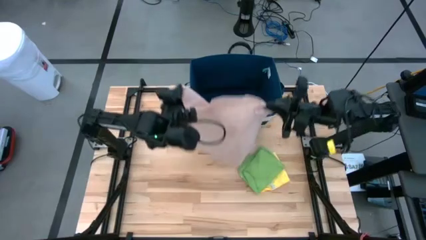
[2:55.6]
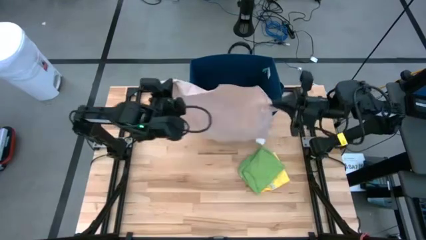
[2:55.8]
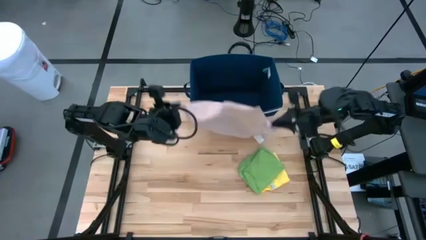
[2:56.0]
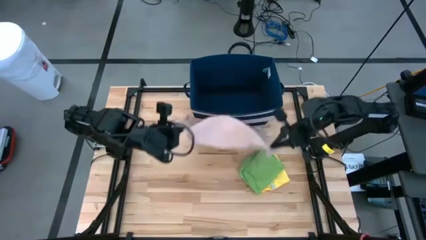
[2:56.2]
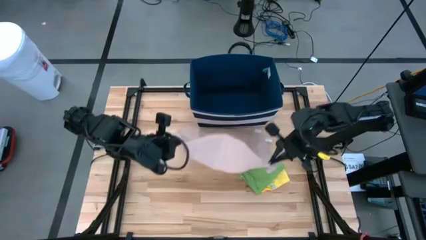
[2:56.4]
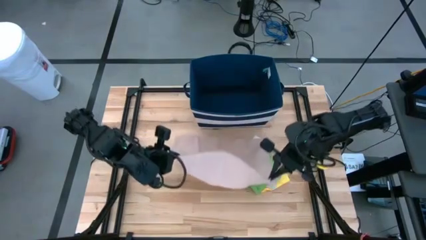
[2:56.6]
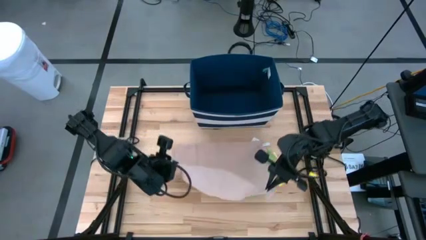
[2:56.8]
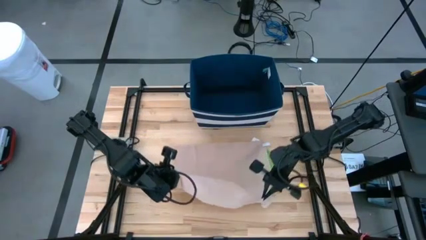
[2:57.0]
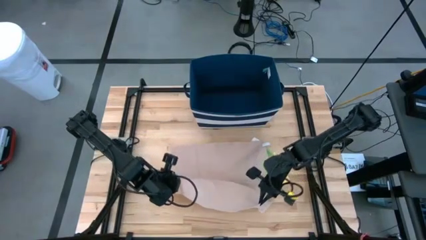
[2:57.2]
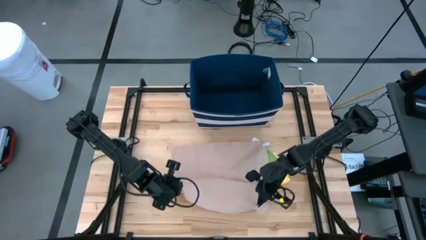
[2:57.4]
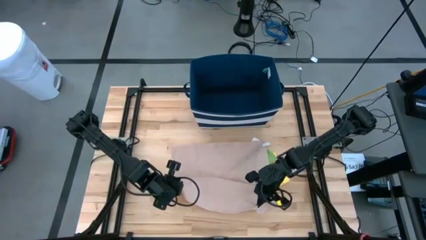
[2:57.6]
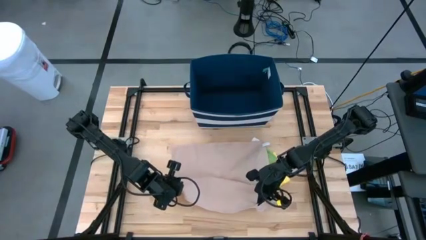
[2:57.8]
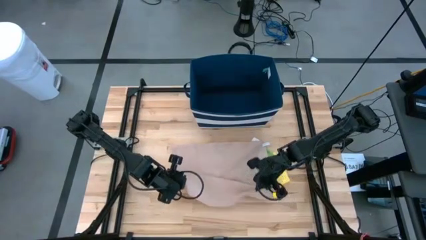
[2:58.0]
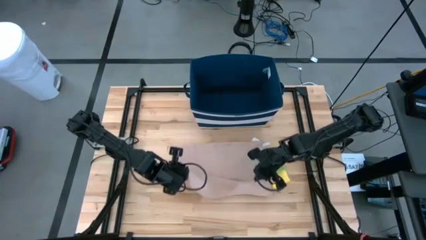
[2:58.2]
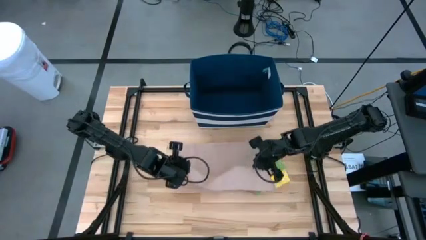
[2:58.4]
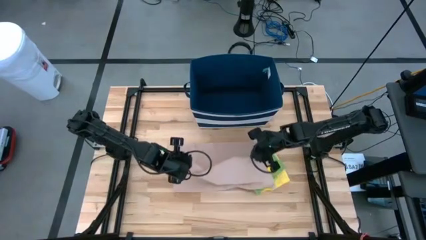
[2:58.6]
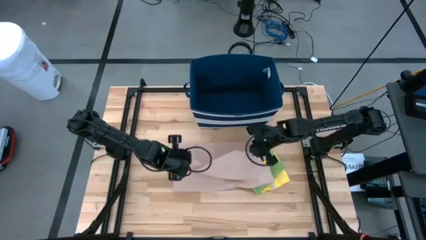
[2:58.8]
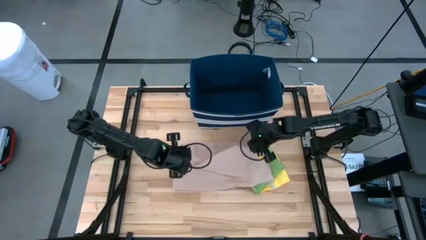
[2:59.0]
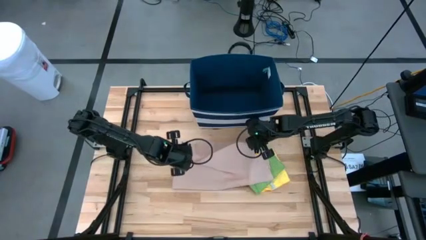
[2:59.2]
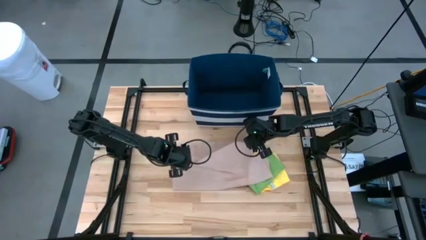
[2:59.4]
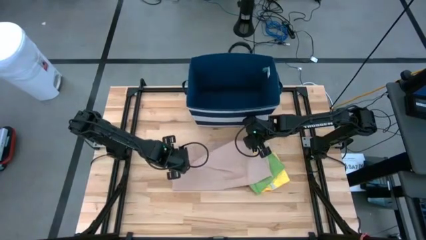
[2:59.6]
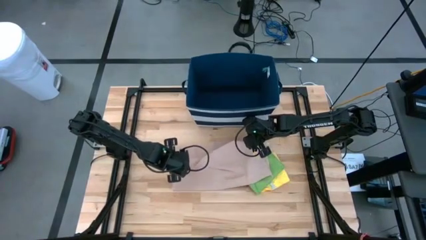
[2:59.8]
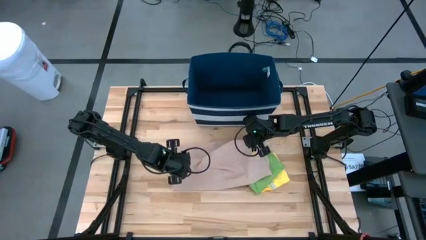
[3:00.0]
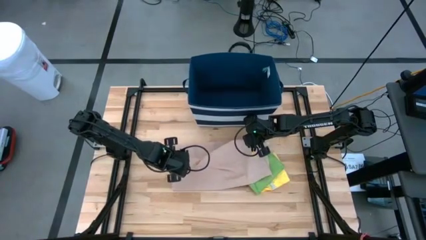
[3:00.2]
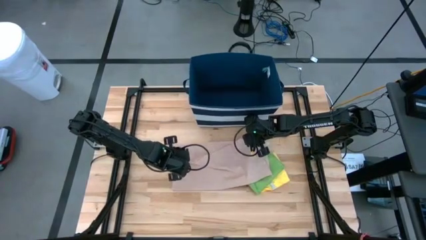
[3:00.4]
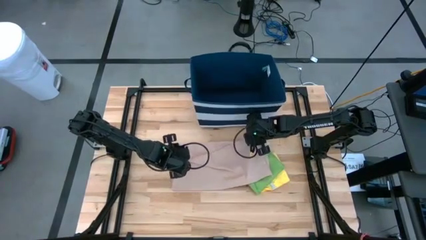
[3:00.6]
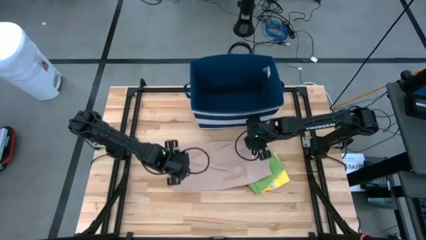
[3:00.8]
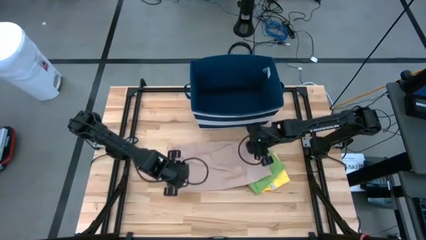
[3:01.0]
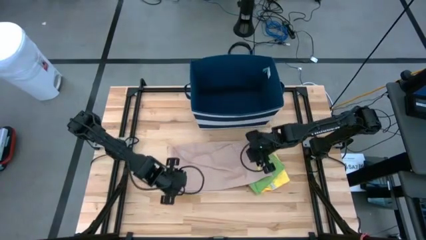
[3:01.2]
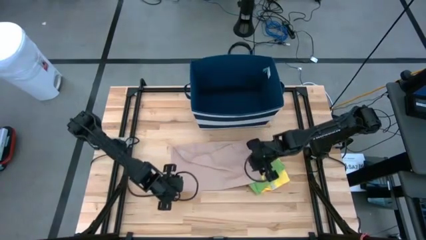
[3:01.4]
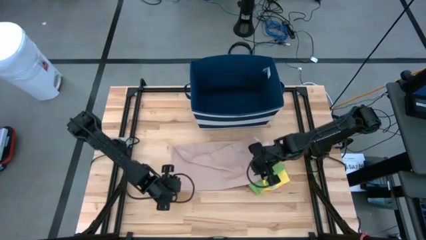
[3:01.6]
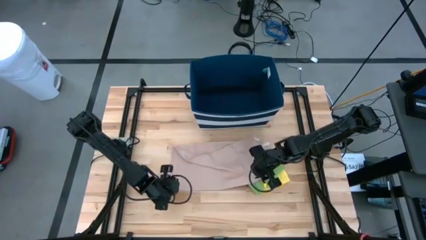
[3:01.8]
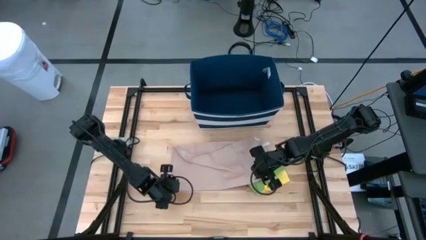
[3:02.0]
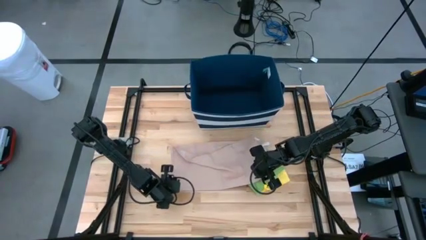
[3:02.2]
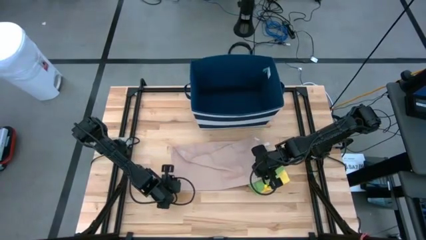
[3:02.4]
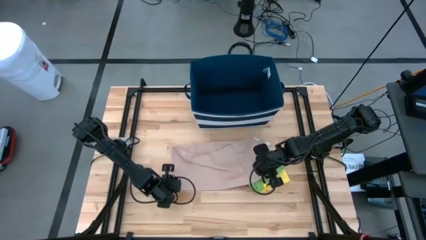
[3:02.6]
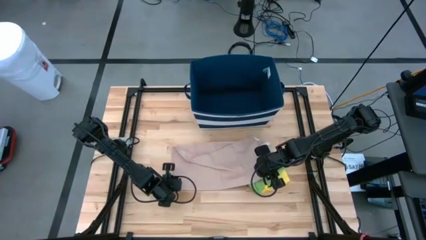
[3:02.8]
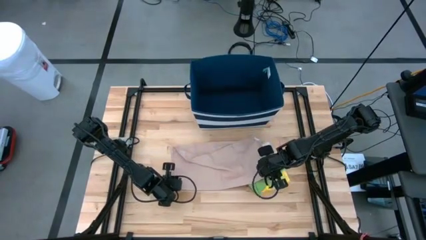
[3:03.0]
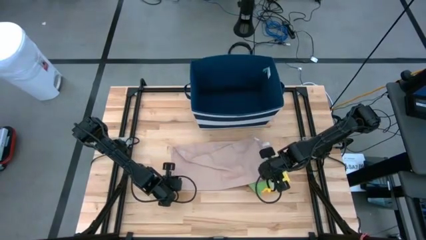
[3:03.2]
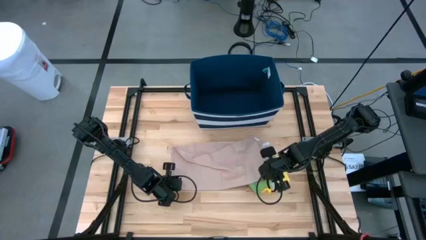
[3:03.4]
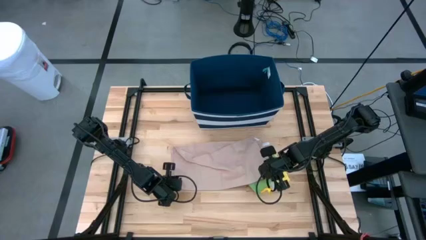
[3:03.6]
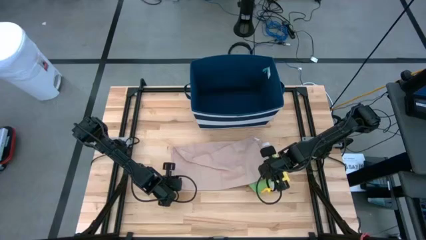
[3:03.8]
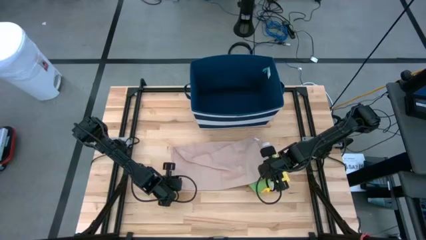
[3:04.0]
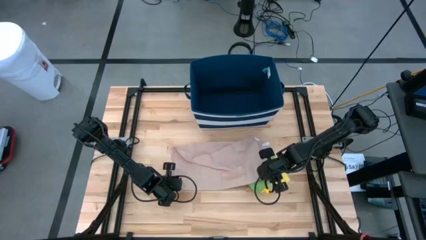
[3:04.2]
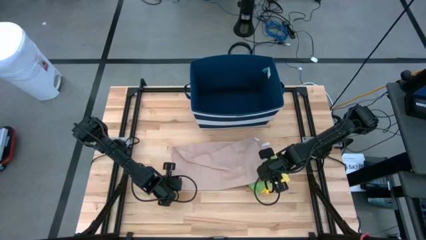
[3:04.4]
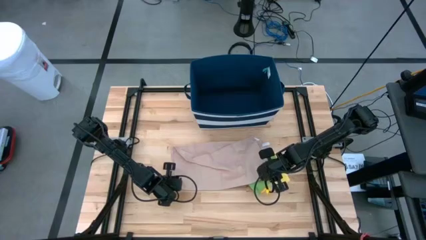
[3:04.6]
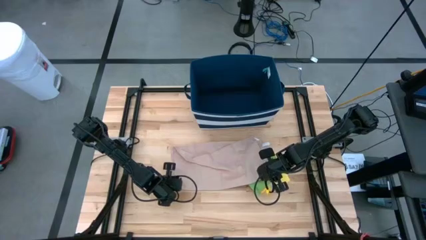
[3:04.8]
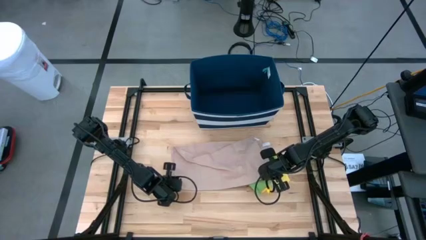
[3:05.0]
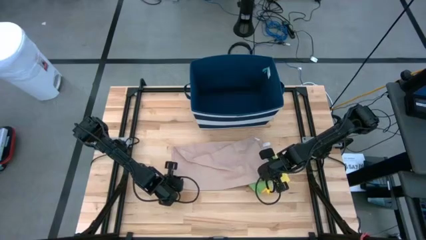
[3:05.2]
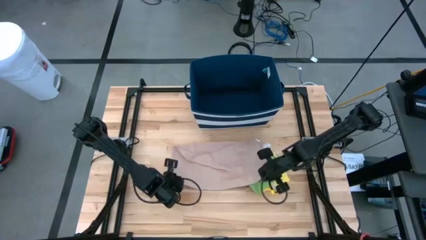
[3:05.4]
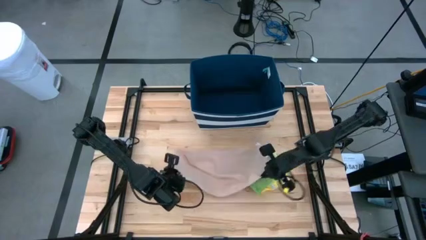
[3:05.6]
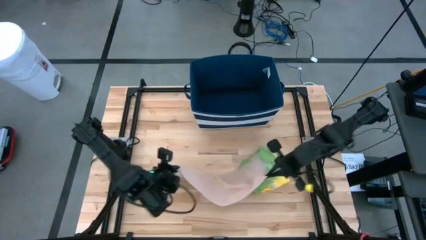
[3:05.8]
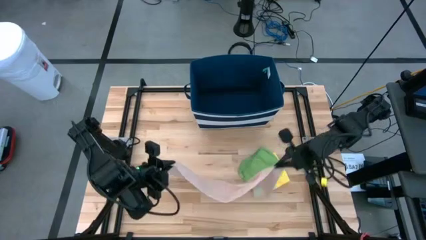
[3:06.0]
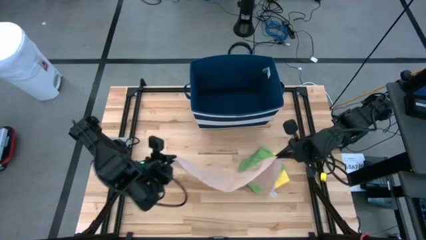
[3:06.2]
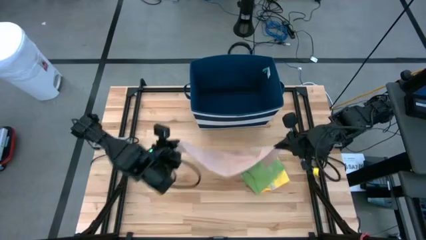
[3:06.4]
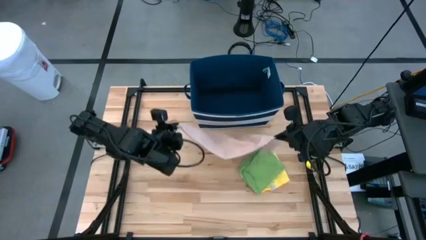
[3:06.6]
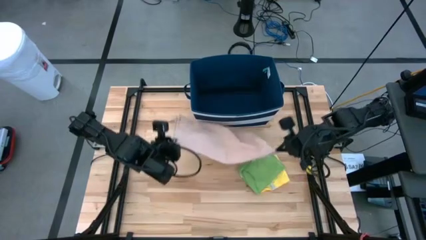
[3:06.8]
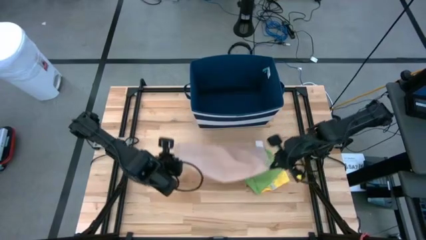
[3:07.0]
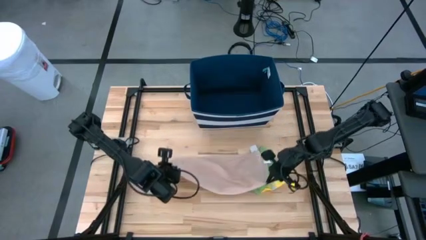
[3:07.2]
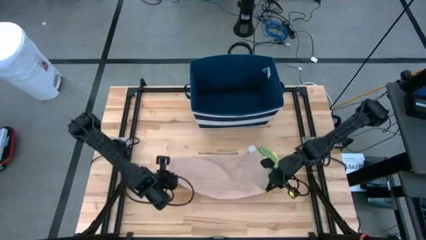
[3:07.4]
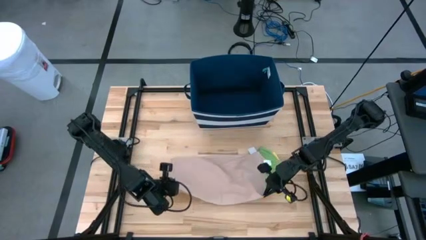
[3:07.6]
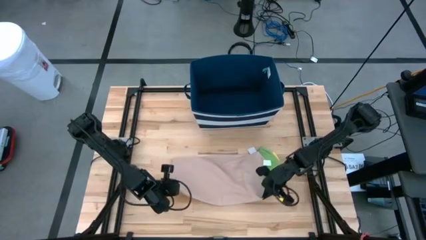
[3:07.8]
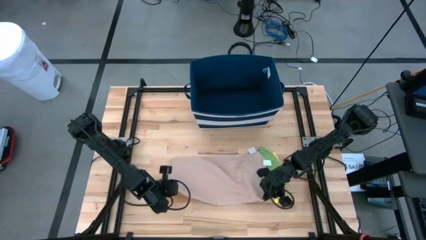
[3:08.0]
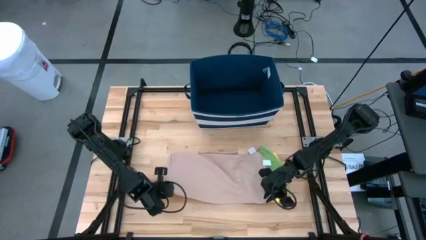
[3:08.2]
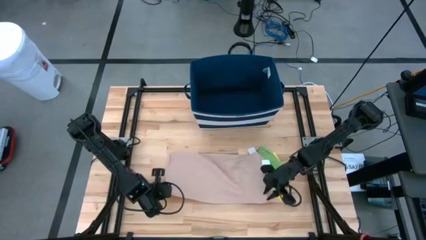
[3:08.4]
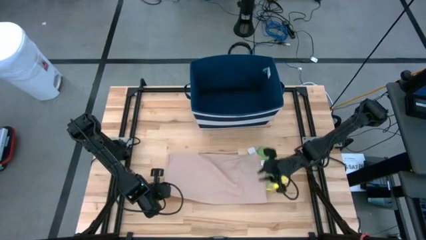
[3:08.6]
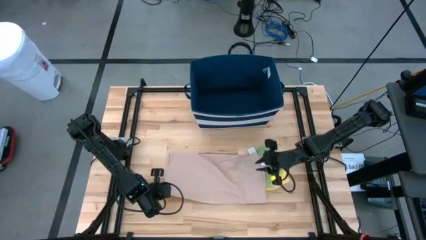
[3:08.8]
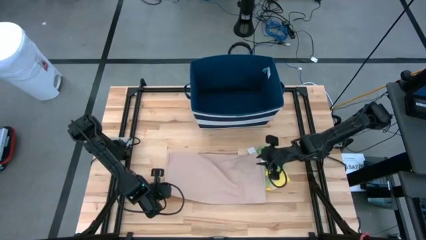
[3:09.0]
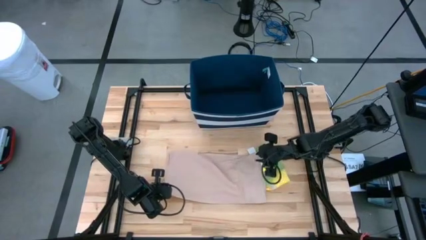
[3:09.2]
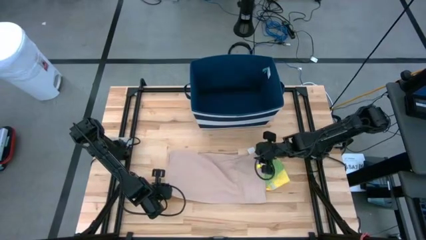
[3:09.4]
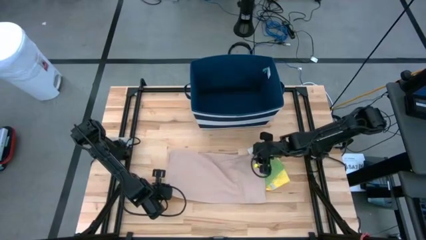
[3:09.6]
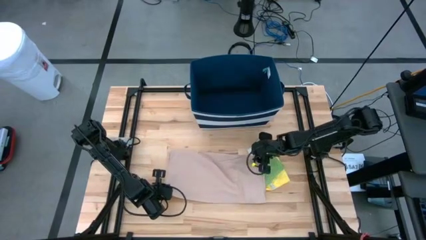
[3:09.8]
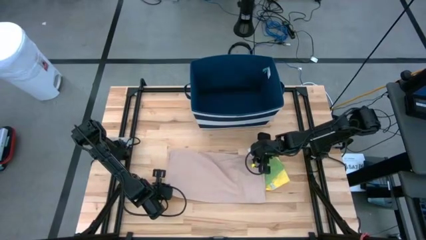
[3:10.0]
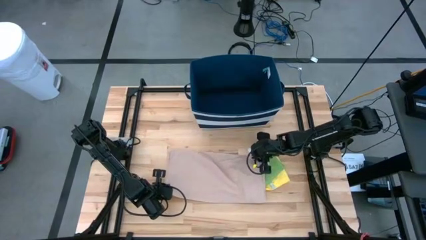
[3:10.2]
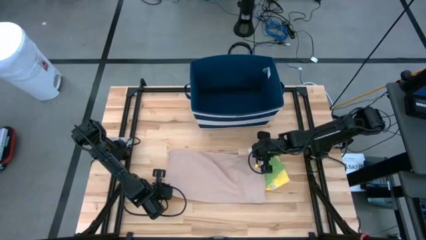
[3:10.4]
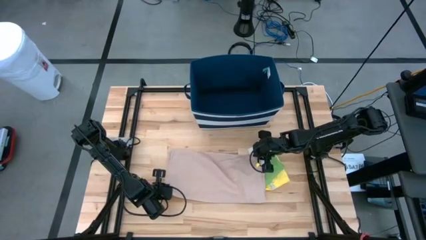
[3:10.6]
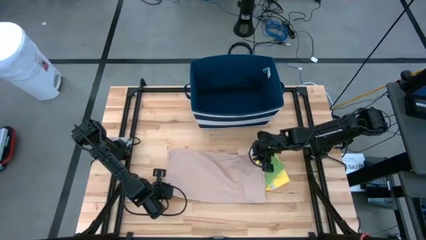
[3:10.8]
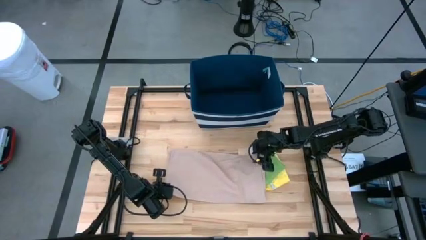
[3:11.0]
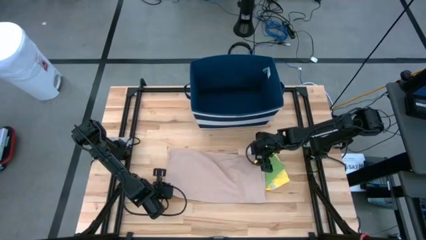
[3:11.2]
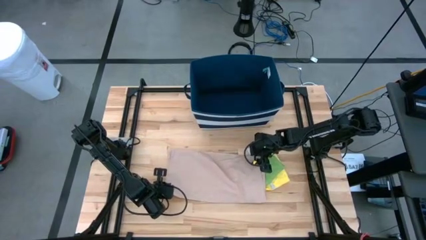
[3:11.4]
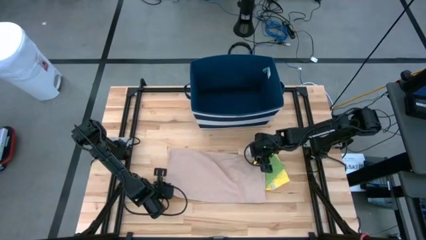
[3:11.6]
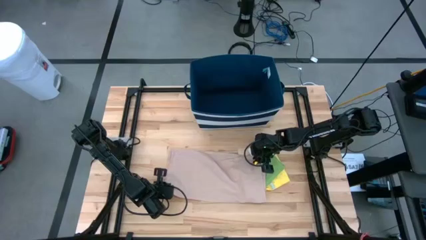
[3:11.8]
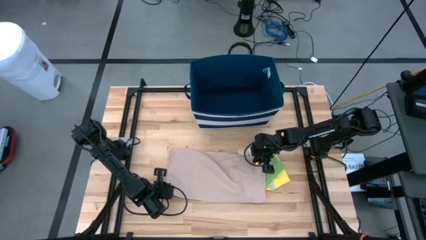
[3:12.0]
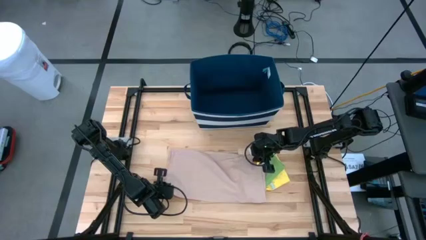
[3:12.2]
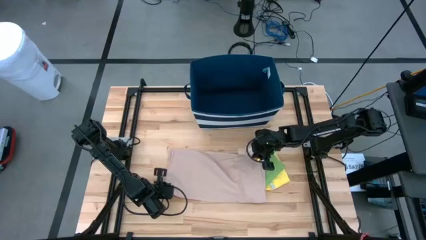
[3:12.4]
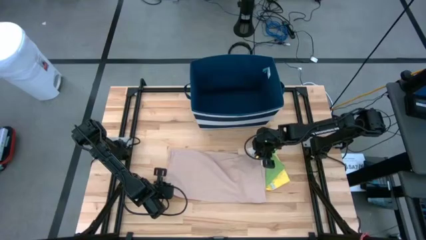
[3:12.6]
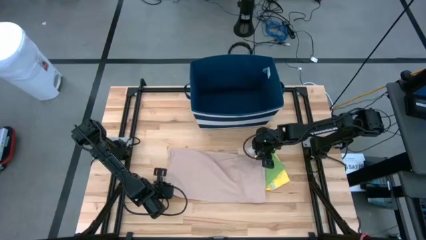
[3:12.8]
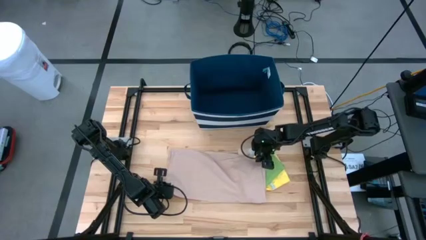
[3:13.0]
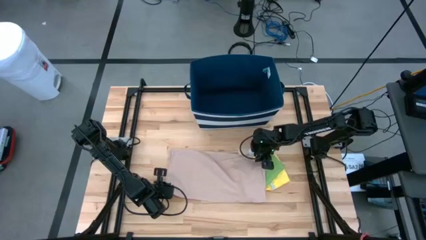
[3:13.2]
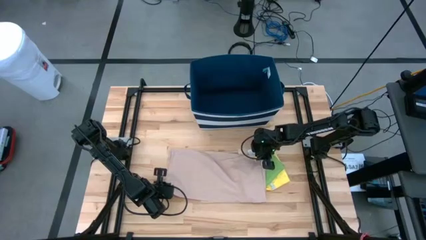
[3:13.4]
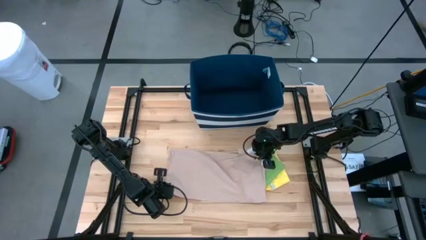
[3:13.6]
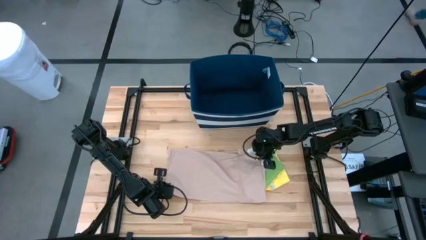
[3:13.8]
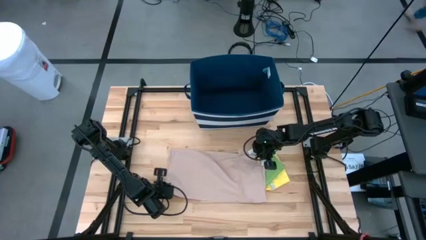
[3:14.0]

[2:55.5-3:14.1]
Task: Fold towel
Fold the light brown towel
